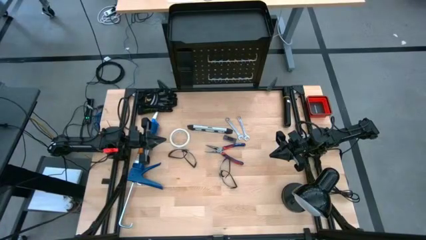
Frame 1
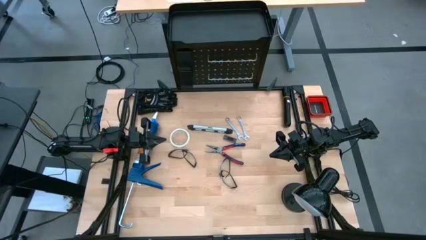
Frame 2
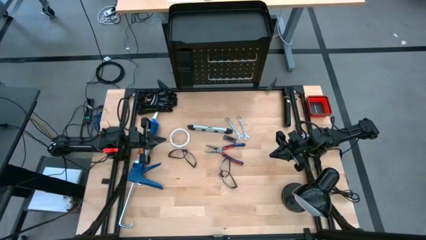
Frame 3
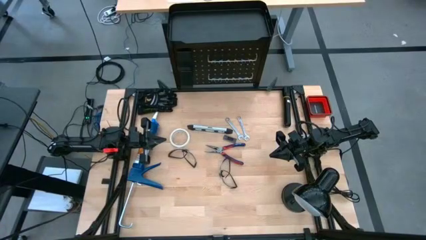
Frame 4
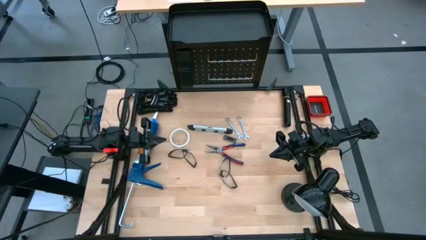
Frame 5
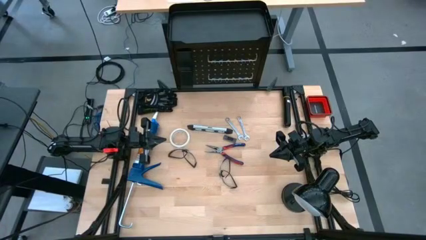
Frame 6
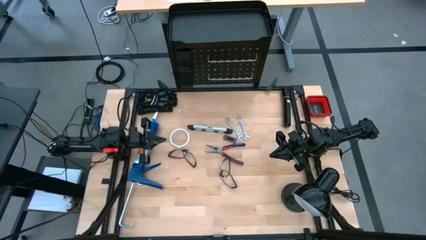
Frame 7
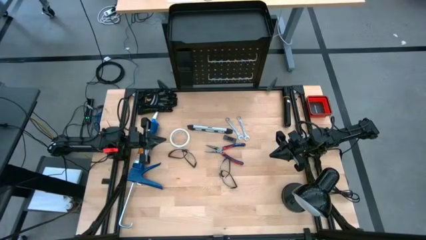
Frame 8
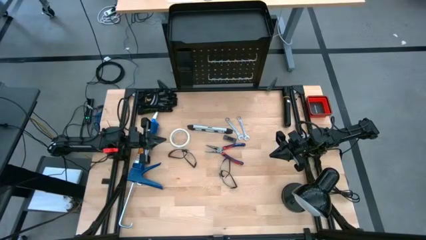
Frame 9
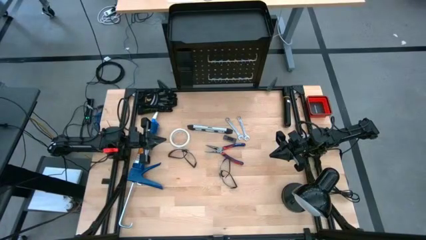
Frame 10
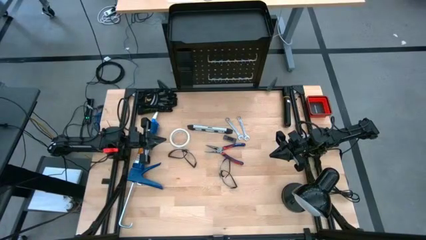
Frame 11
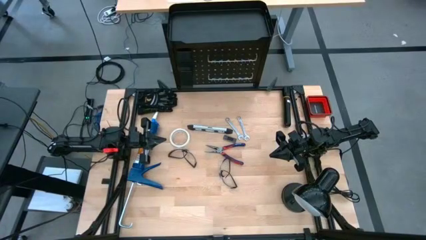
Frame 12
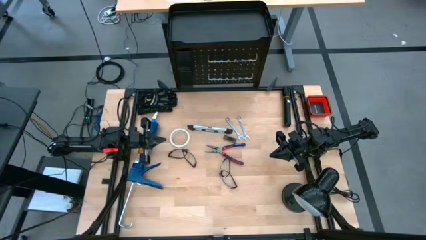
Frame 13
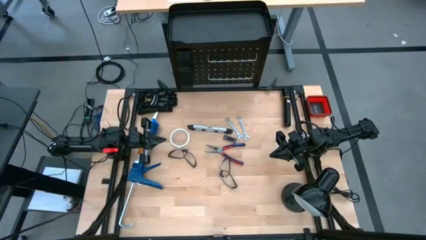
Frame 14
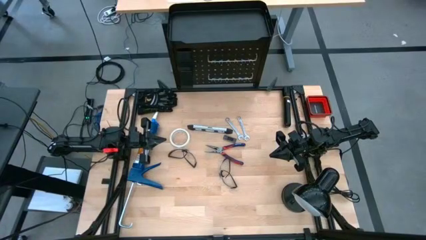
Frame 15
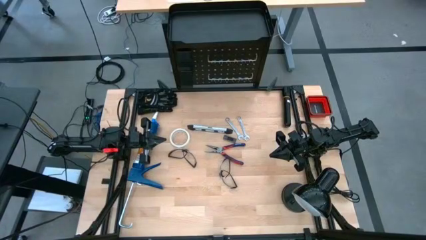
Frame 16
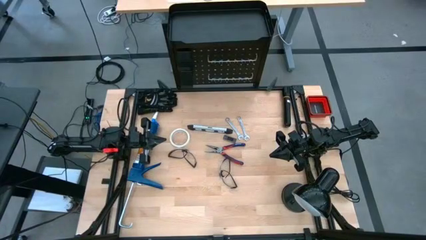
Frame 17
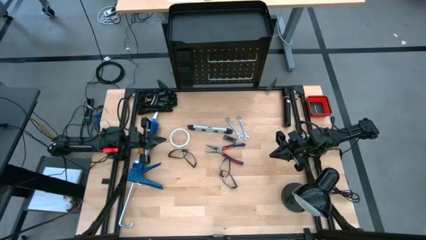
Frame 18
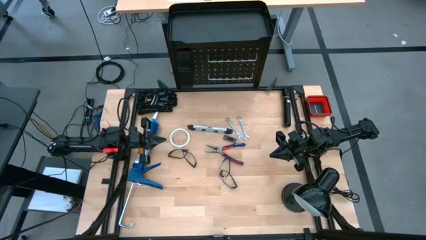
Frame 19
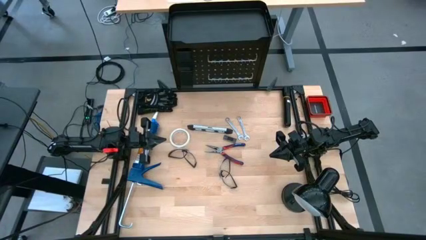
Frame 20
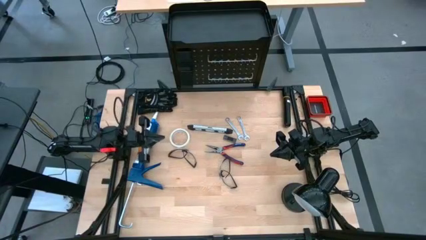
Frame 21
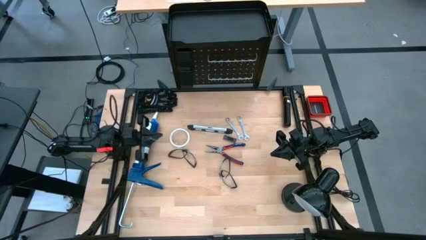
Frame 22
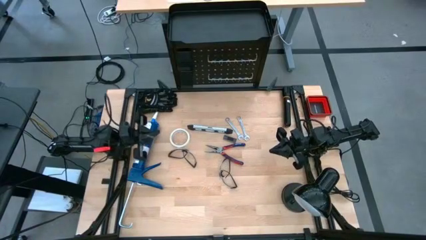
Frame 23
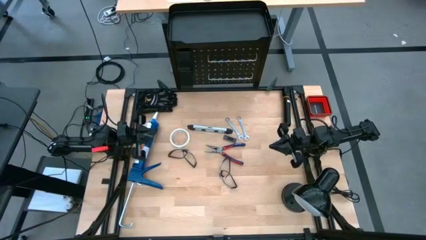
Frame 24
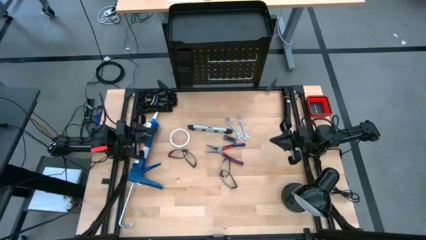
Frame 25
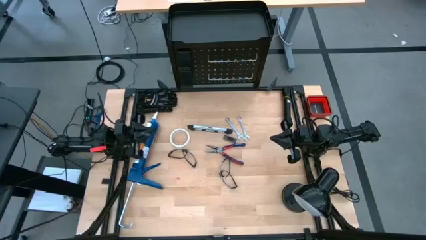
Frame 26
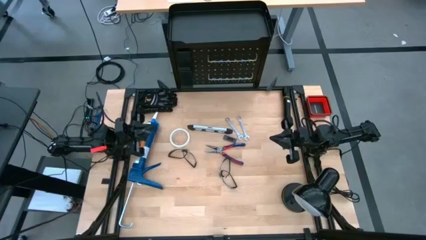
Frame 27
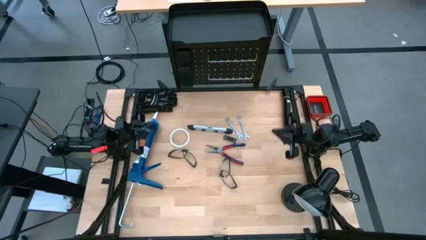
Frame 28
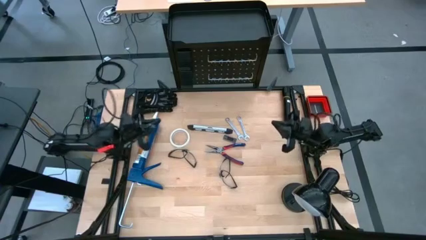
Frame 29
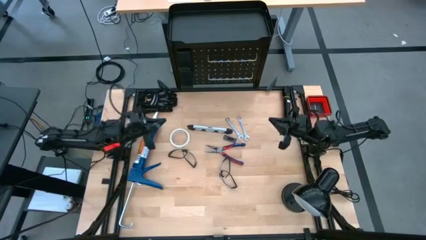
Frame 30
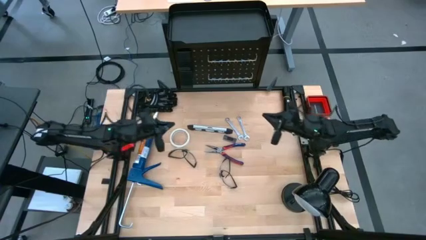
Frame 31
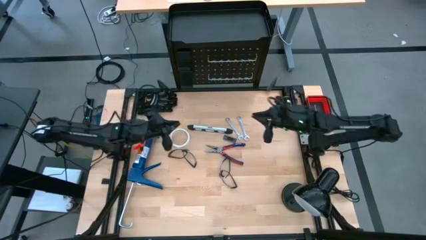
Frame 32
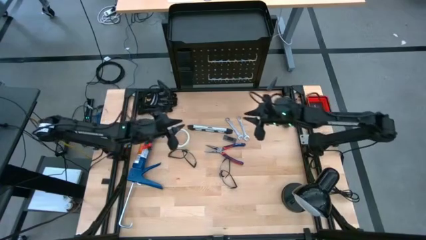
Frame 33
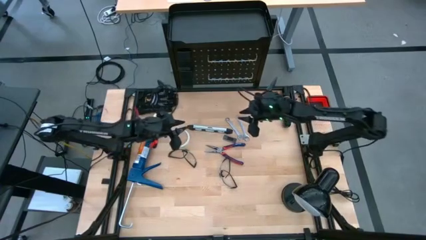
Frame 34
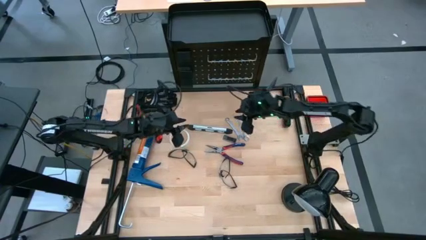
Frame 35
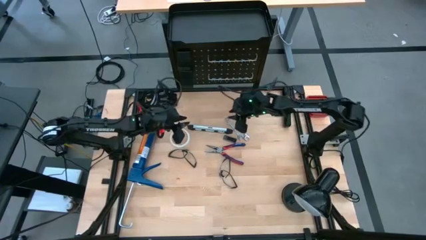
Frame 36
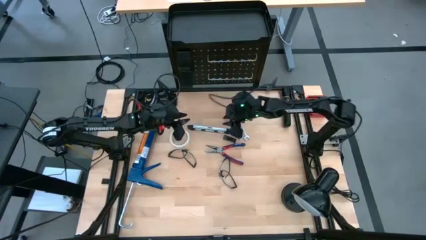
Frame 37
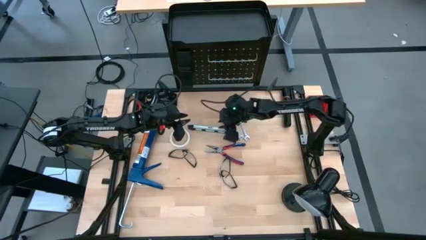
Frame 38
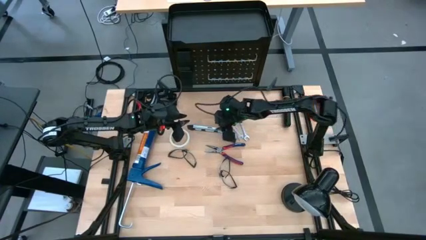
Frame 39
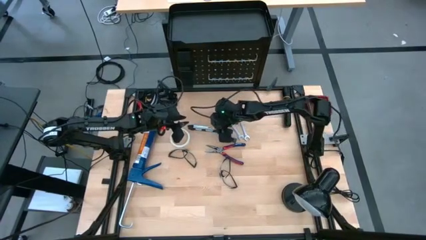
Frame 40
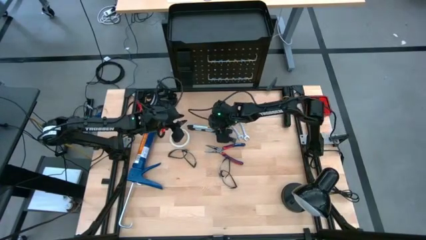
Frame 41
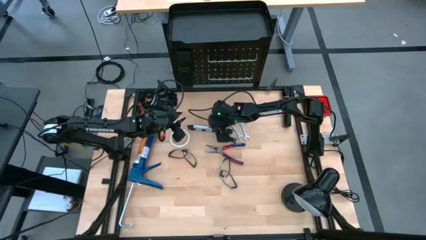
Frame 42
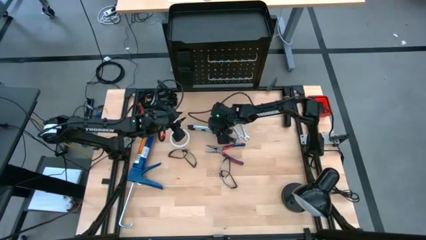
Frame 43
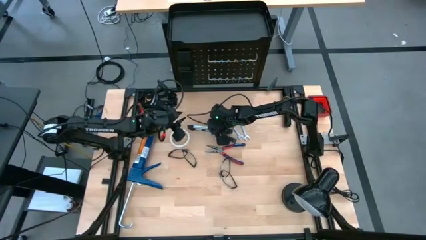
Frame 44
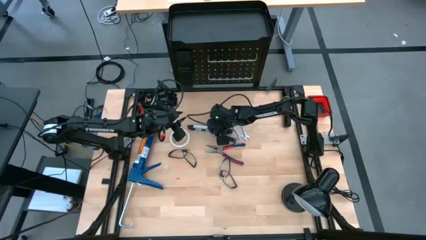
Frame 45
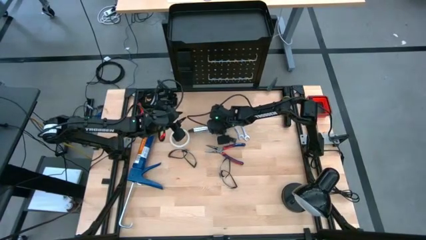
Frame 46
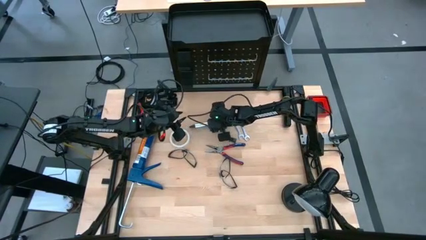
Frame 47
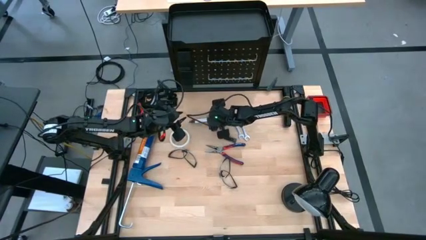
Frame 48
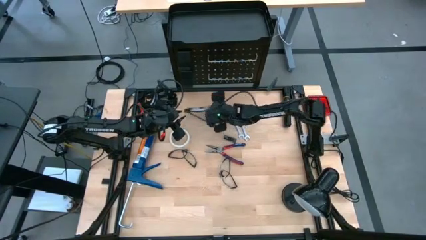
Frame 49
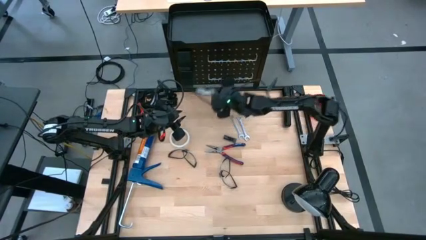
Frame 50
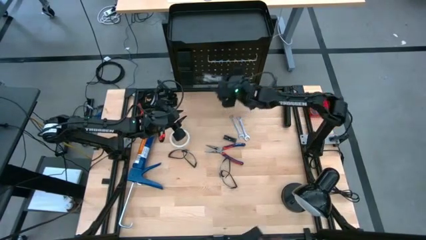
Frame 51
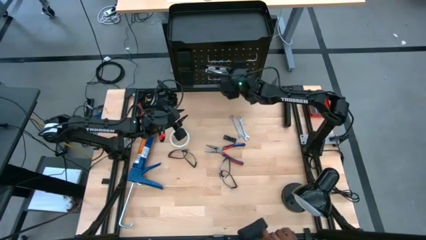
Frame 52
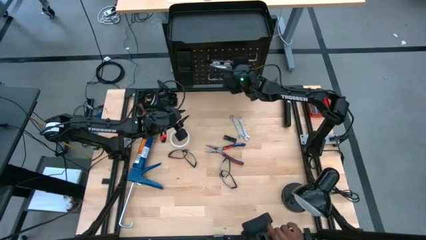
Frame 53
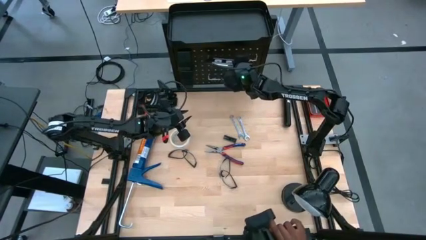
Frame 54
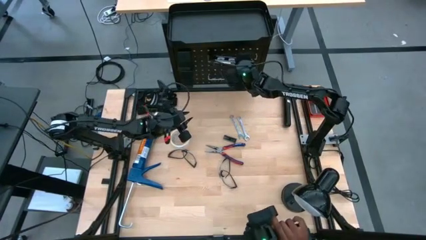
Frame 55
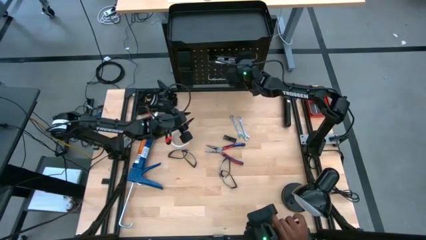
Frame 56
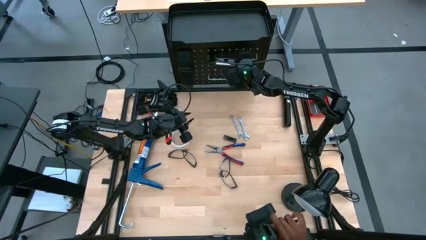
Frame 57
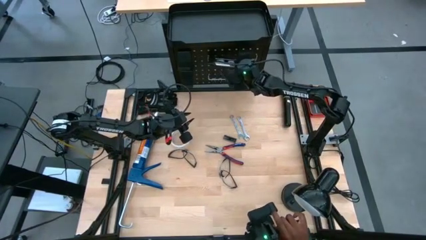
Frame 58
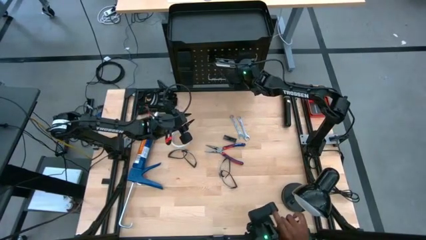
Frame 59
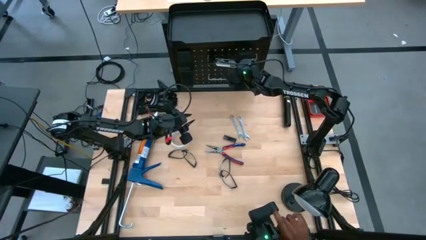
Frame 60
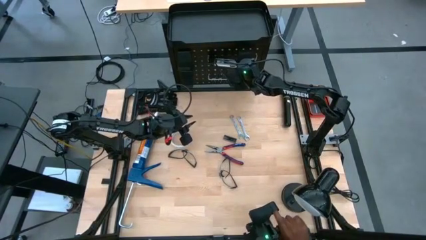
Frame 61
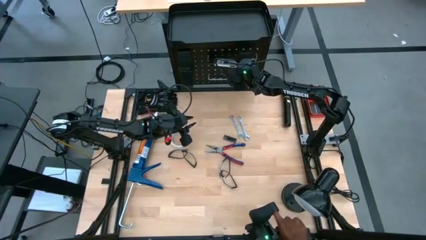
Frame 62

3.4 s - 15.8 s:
Task: Hang tools onto peg board
Hang the spirit level on the peg board

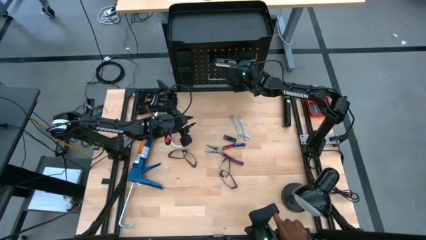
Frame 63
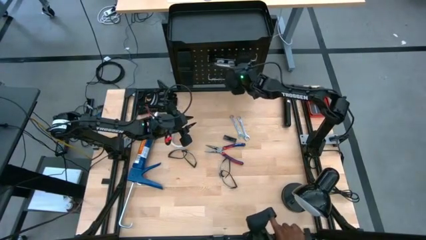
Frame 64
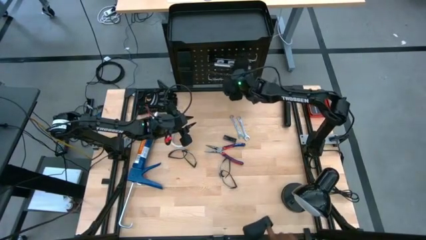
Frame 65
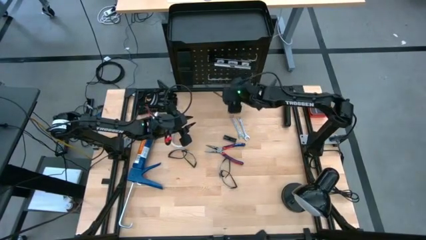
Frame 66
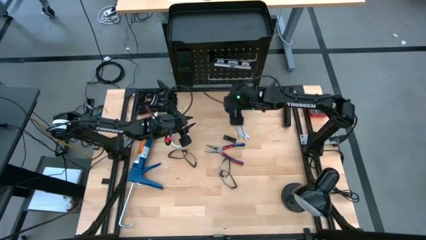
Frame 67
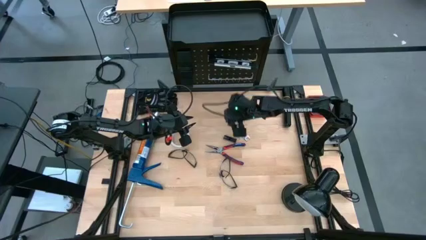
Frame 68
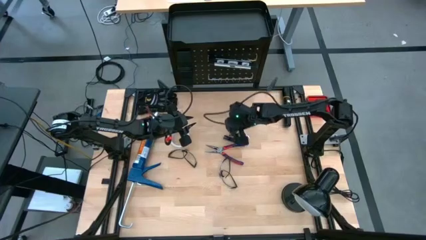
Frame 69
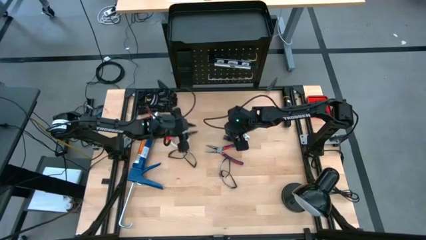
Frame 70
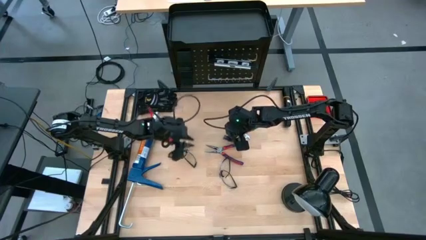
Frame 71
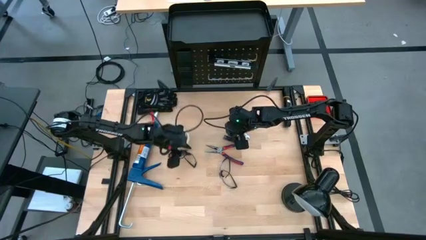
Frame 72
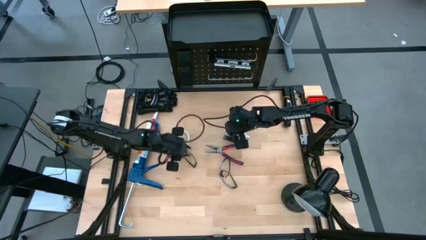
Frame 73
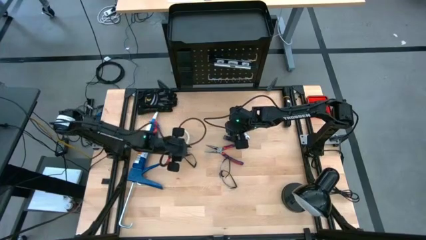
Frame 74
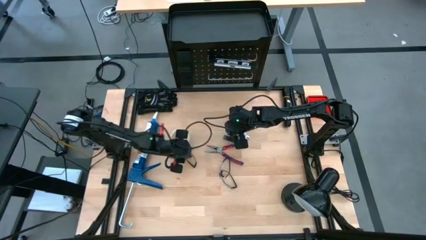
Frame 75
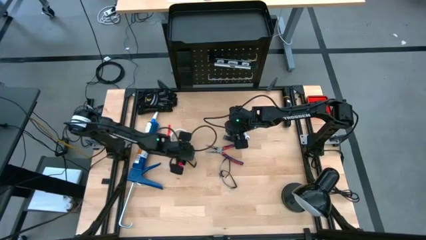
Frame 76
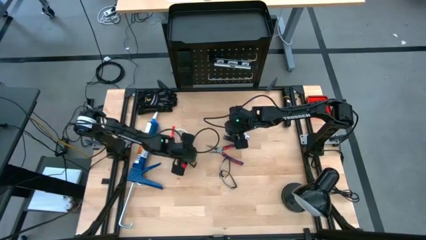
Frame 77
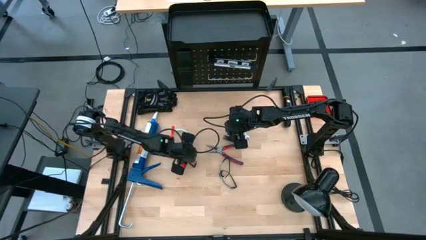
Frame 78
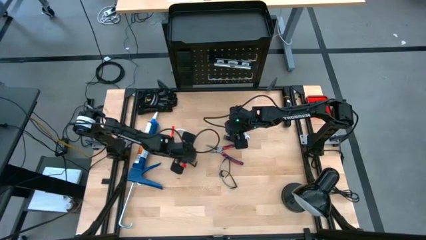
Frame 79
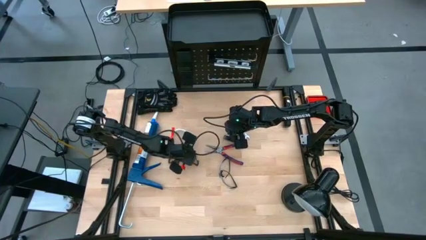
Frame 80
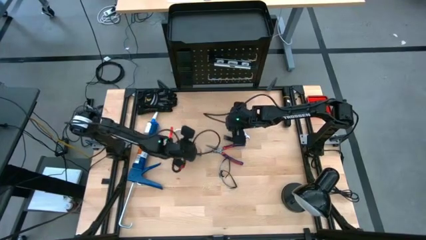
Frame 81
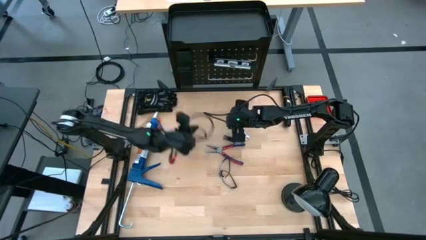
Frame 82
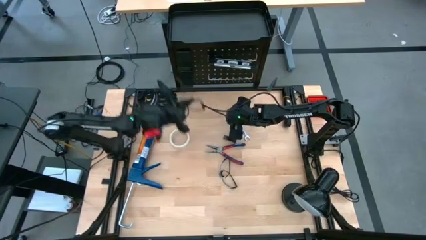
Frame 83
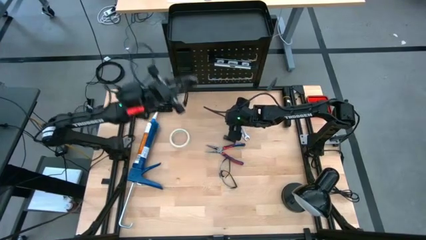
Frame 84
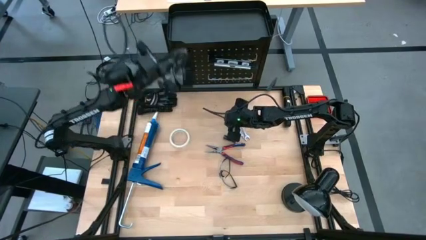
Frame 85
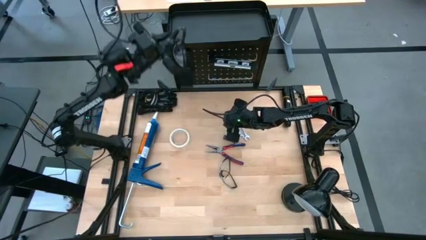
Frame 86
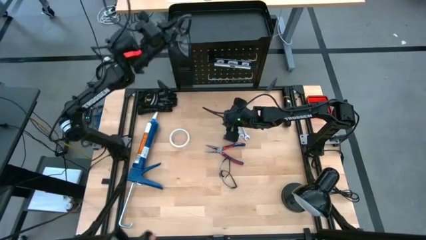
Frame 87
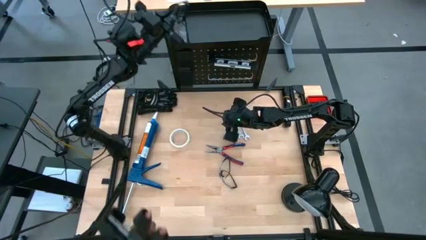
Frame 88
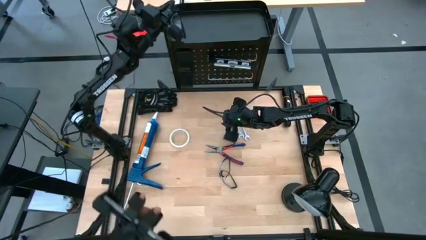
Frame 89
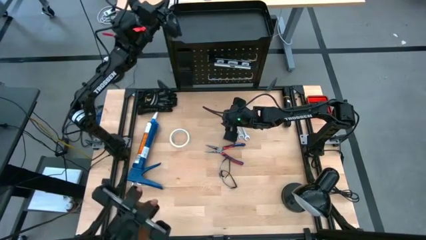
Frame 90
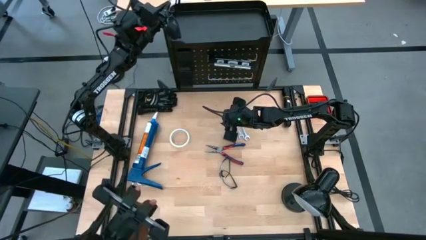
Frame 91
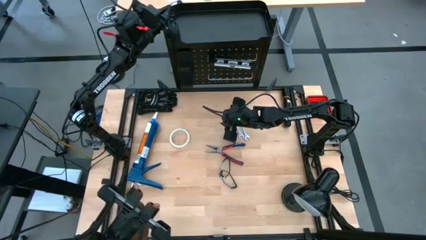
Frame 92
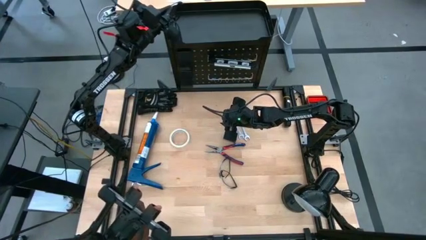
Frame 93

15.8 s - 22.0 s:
Put the top safety goggles on the peg board bin
